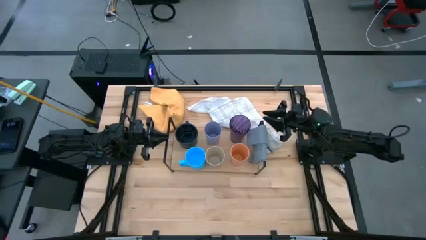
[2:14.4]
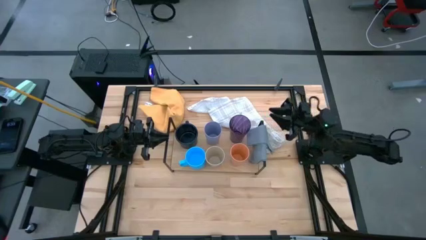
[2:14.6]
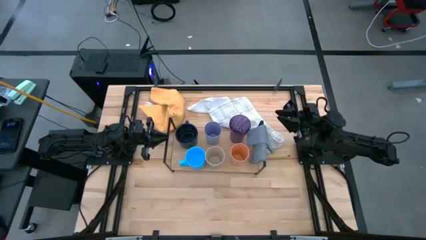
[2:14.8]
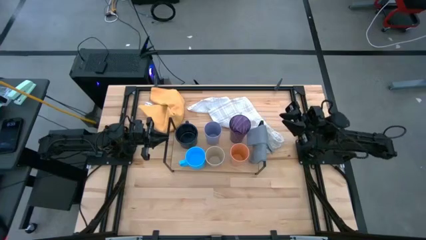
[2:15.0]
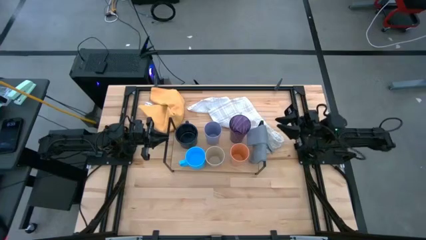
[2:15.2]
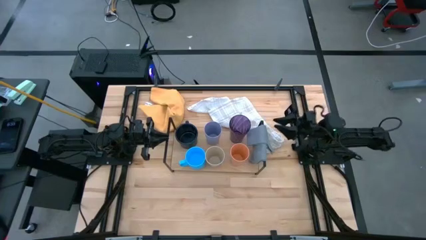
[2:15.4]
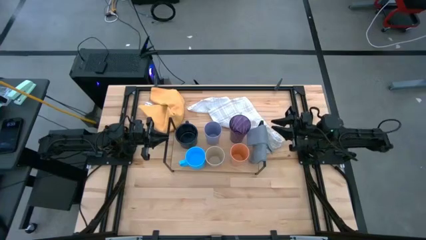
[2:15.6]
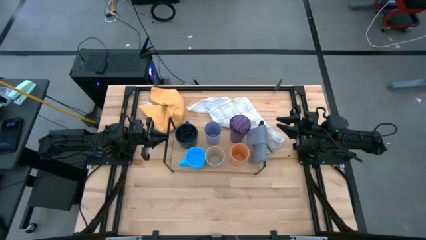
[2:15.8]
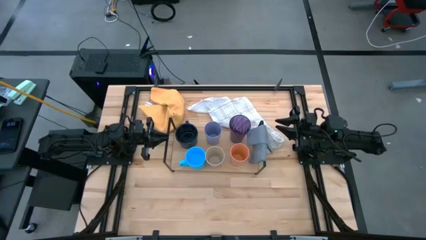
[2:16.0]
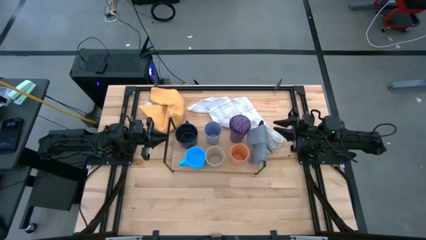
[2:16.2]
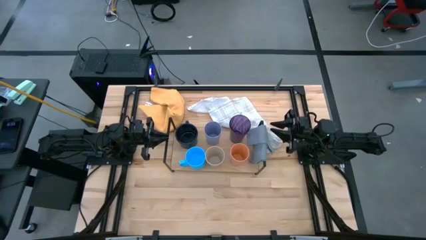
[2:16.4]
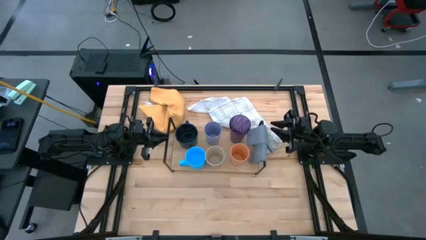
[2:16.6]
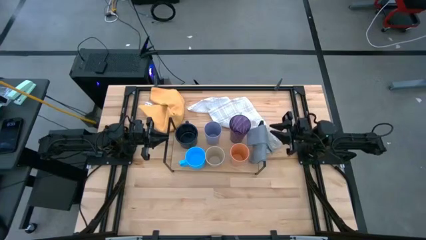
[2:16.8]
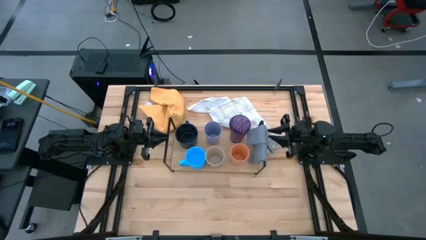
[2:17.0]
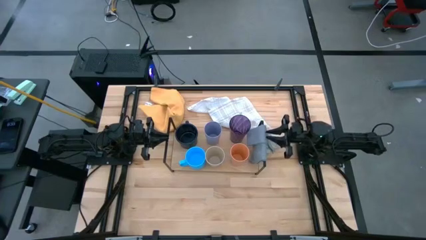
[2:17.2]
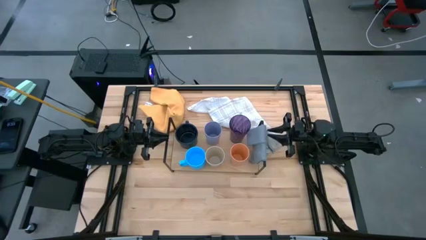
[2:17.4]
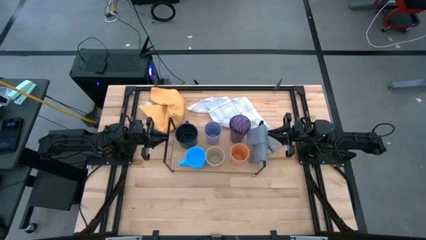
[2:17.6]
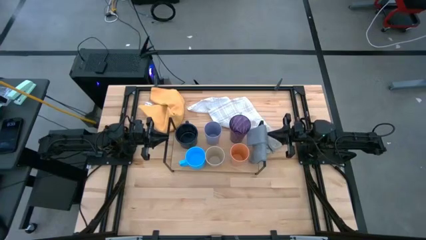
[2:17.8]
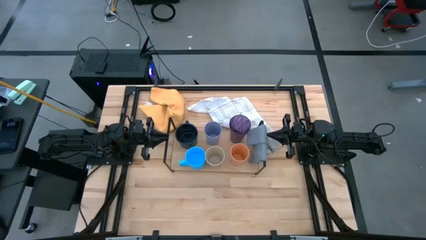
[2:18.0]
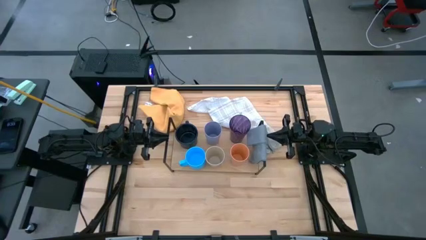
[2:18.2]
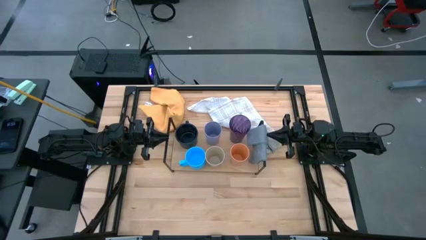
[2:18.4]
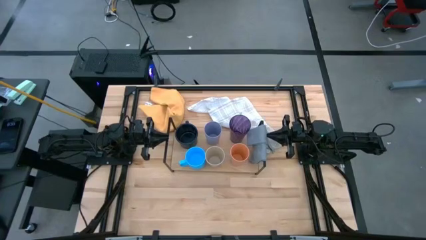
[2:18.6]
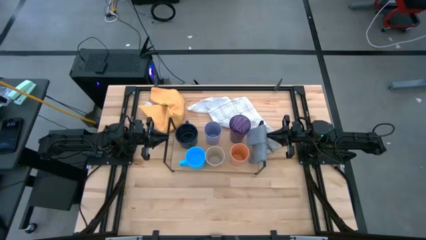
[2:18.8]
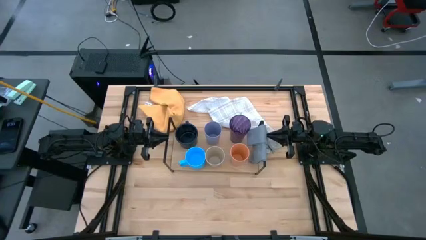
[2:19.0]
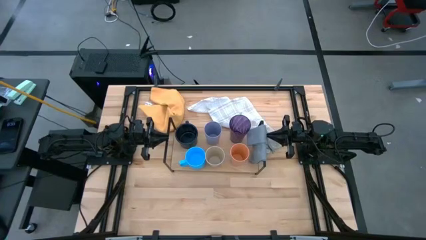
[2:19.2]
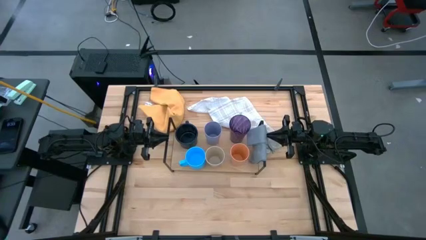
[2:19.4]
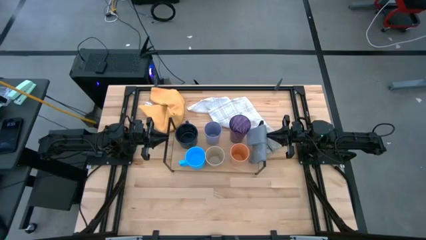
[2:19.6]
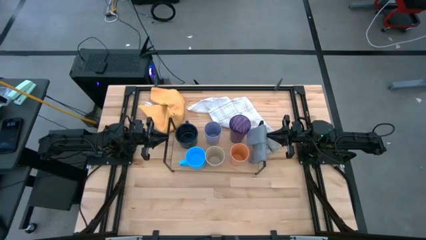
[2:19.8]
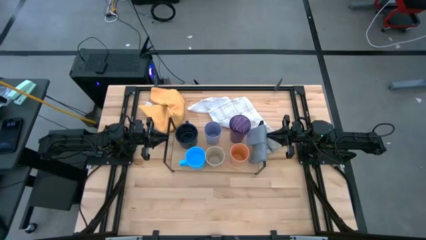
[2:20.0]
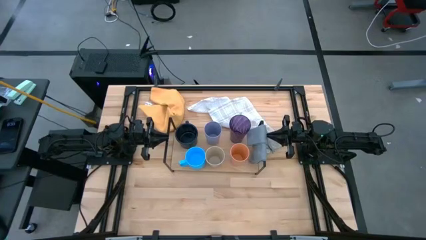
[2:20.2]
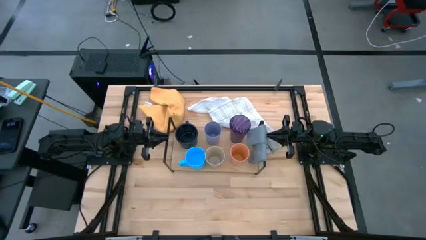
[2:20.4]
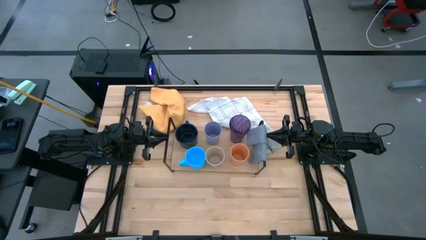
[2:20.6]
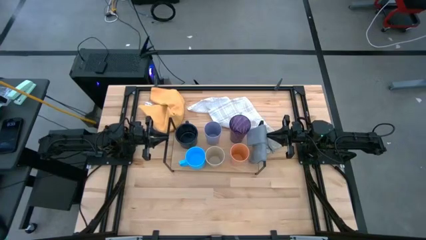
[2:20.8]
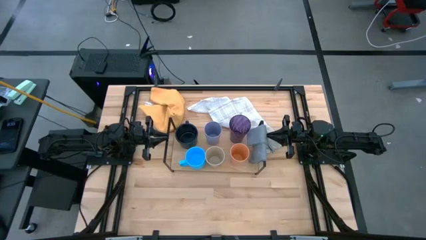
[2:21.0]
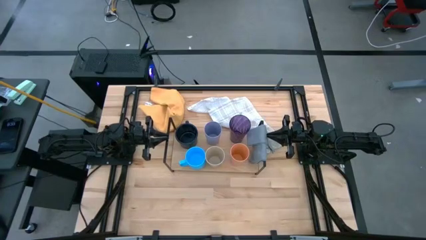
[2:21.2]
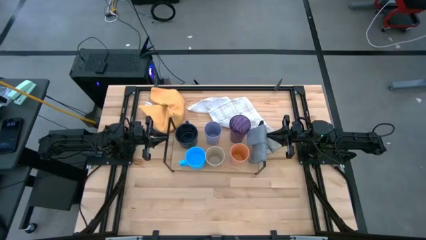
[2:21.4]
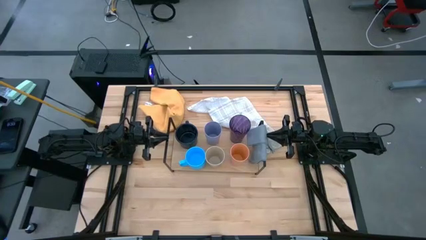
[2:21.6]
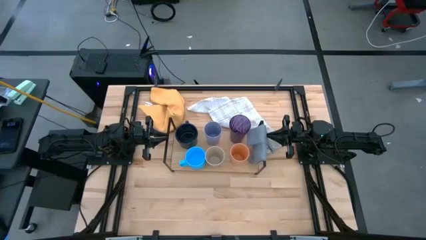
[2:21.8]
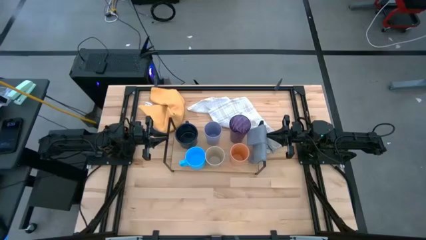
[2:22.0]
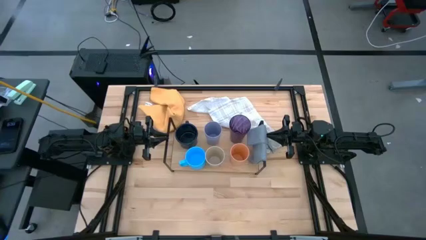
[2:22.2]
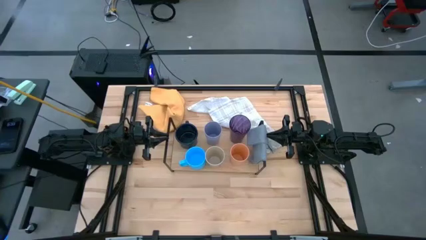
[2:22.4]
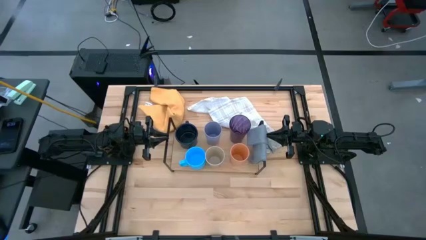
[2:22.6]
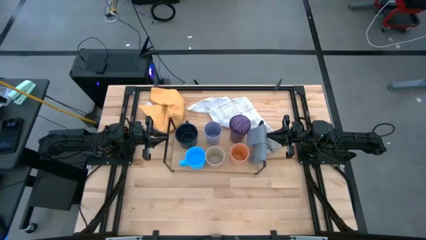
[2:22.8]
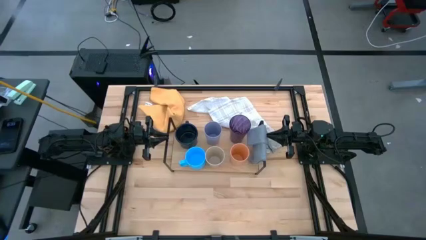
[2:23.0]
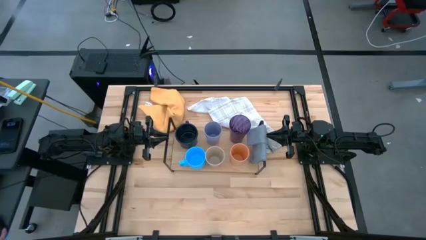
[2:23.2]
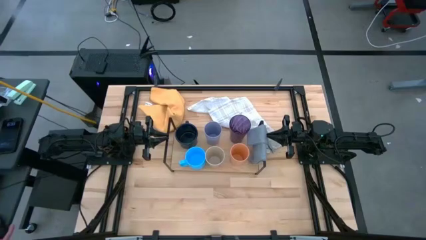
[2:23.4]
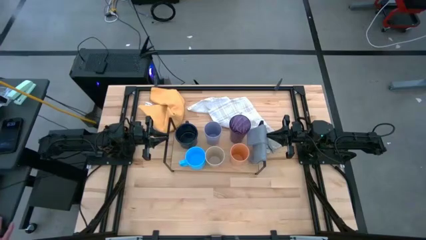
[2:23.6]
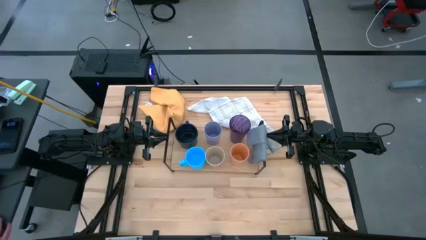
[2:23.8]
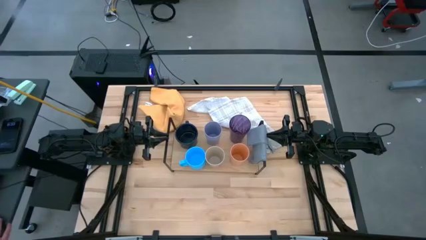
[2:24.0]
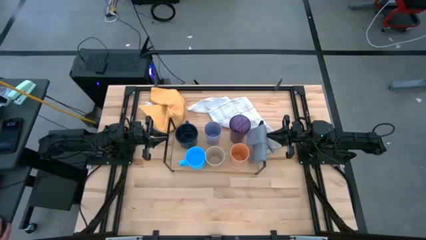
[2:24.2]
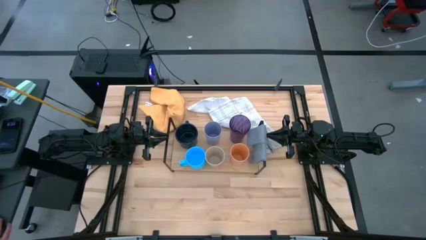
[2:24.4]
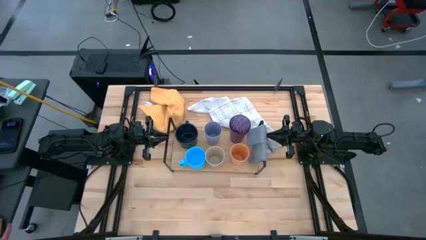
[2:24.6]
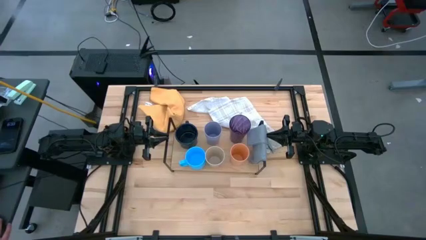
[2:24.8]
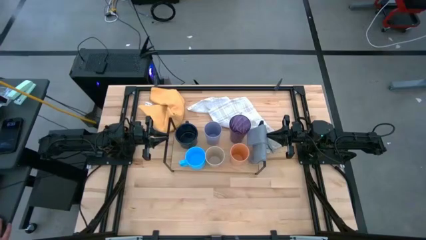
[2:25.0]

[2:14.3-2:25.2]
Task: Stack small to large cups/mugs on shelf
Return to Home Position
